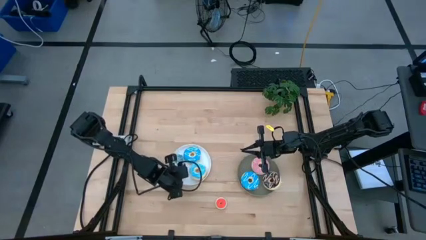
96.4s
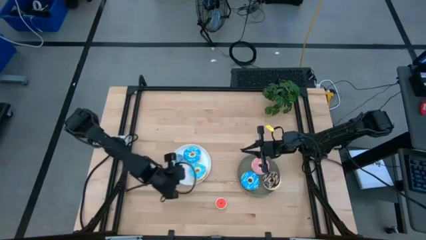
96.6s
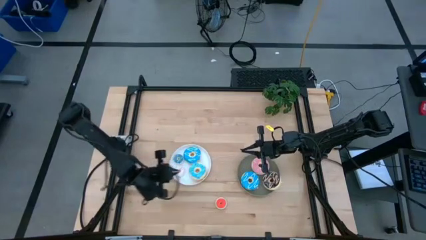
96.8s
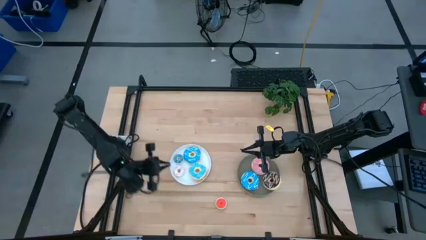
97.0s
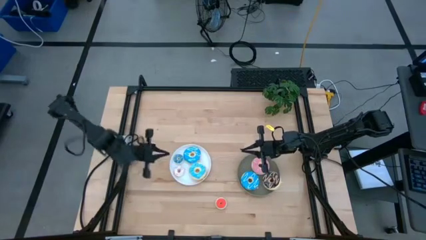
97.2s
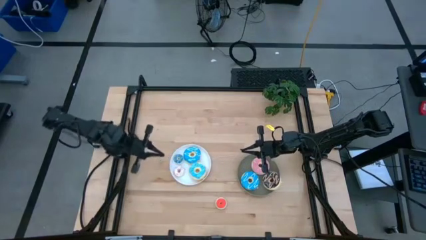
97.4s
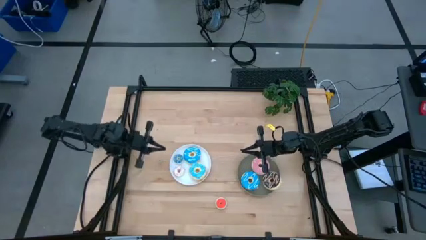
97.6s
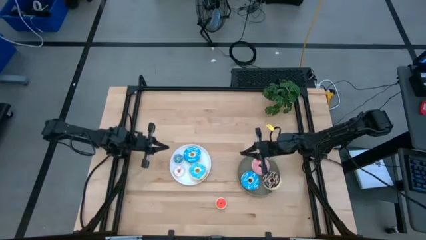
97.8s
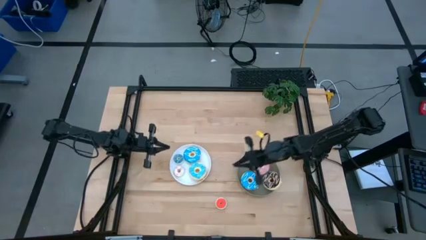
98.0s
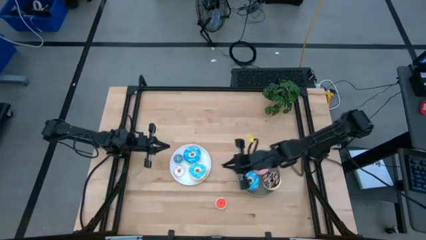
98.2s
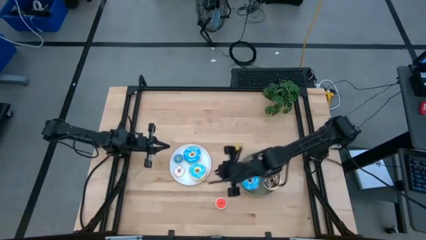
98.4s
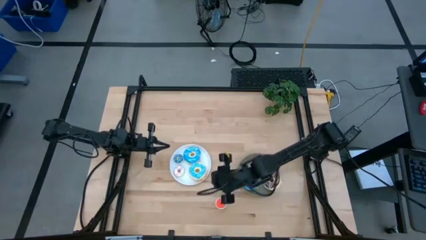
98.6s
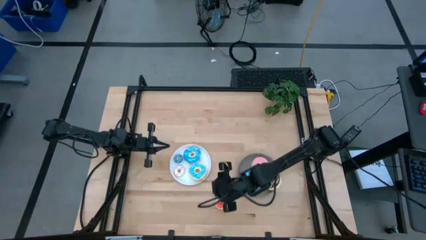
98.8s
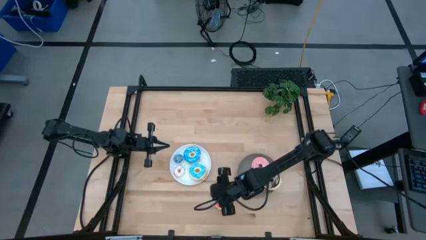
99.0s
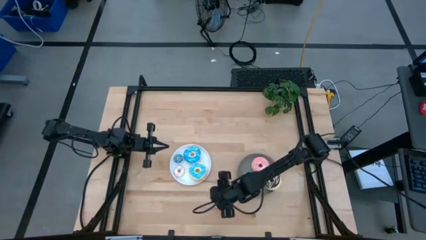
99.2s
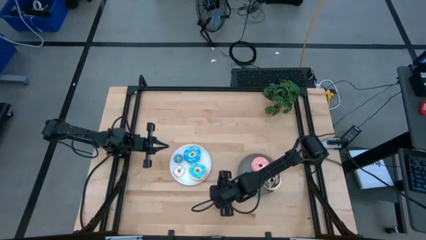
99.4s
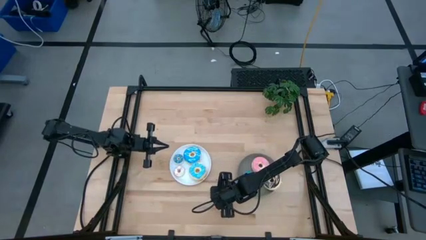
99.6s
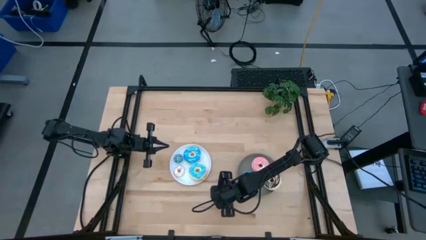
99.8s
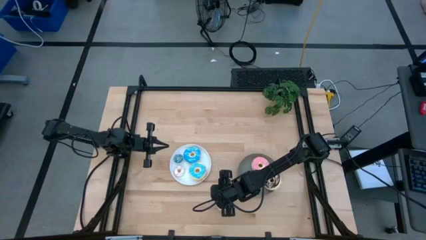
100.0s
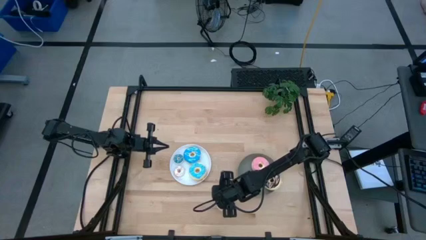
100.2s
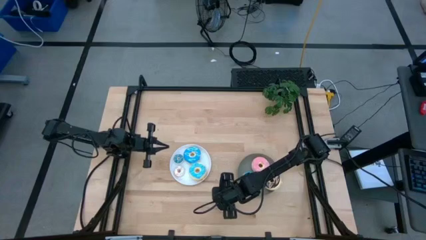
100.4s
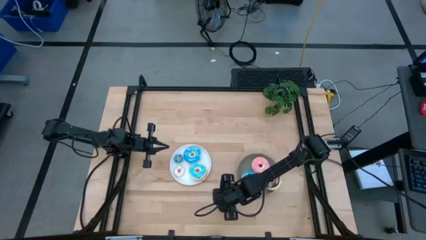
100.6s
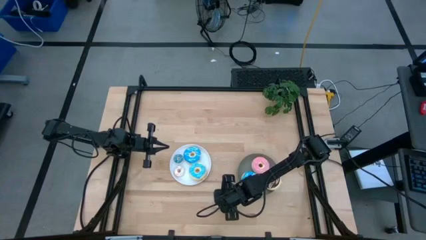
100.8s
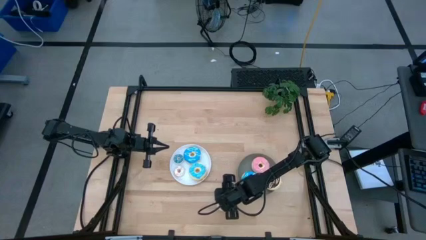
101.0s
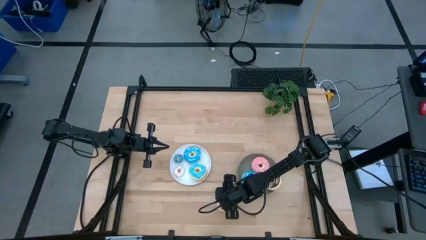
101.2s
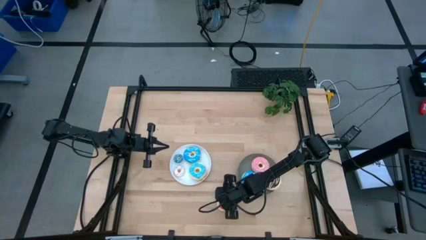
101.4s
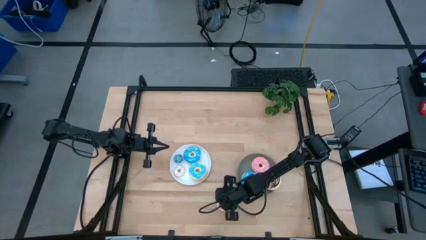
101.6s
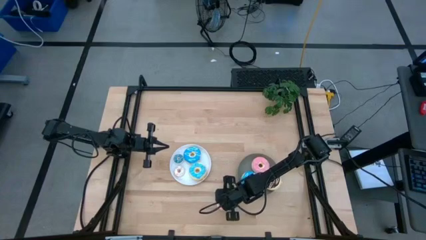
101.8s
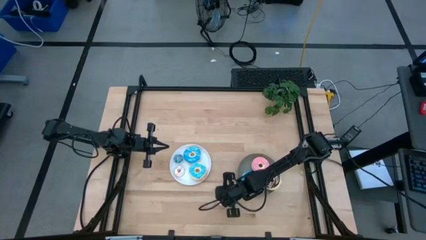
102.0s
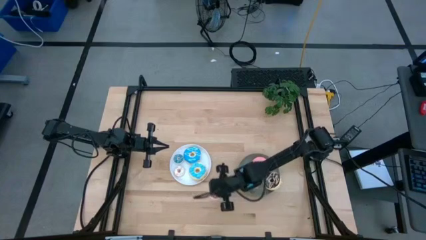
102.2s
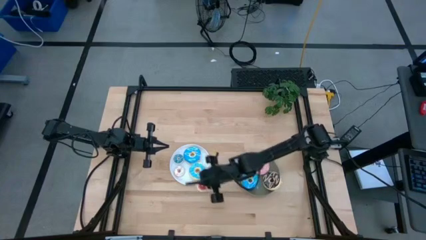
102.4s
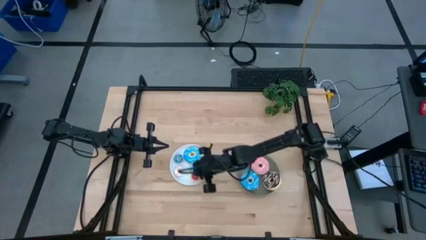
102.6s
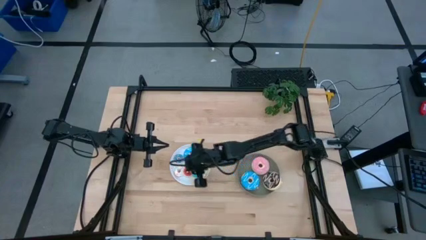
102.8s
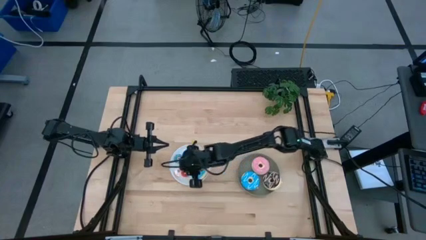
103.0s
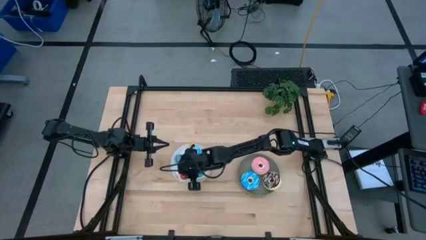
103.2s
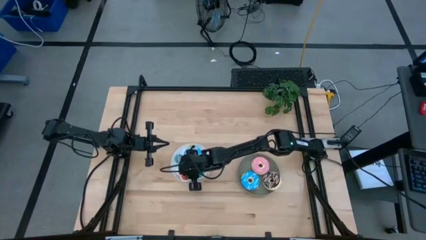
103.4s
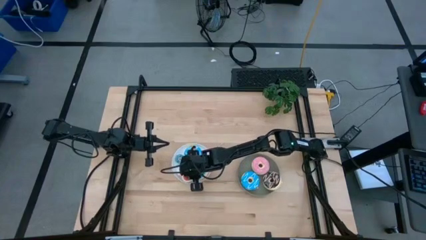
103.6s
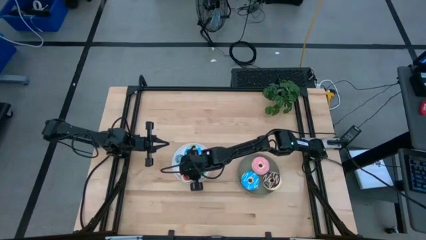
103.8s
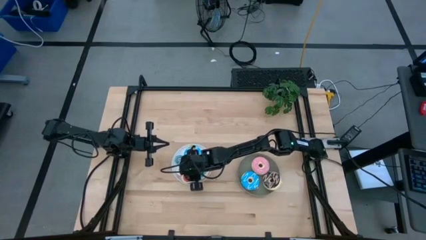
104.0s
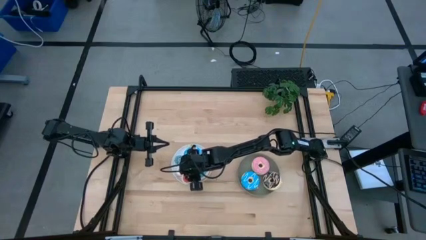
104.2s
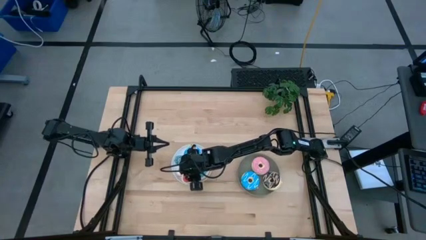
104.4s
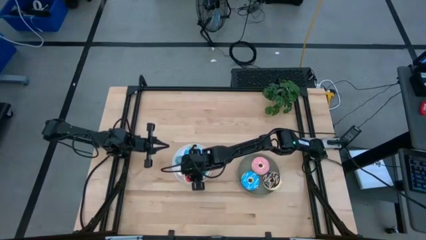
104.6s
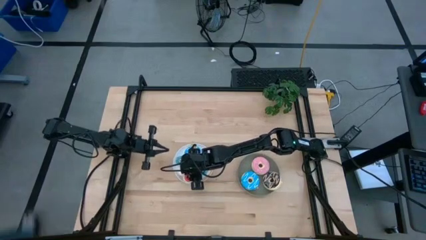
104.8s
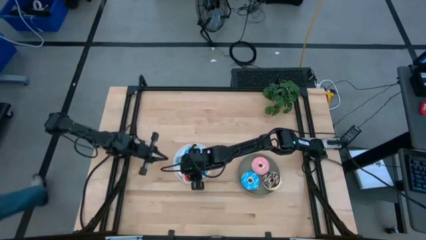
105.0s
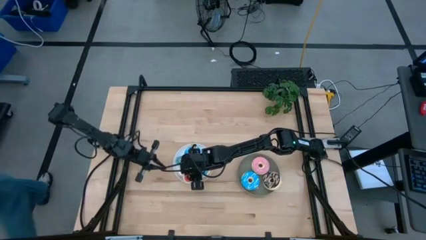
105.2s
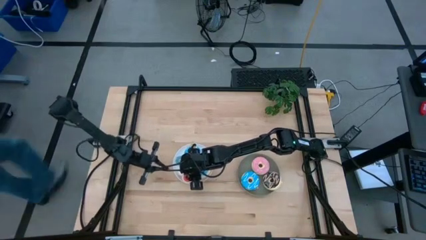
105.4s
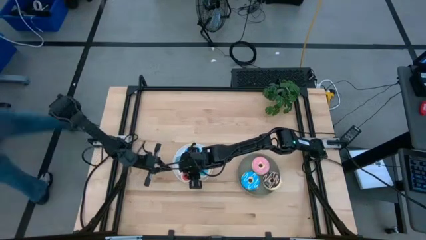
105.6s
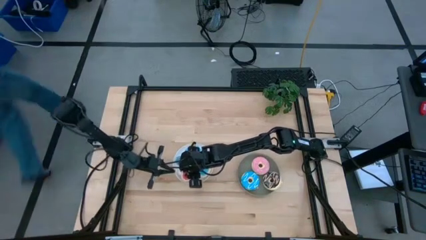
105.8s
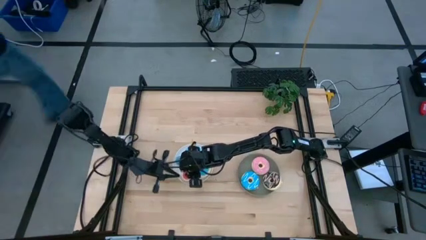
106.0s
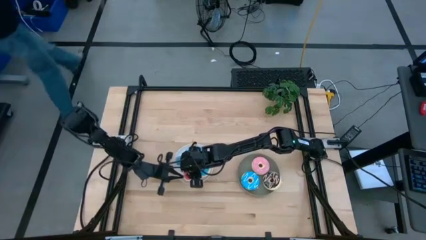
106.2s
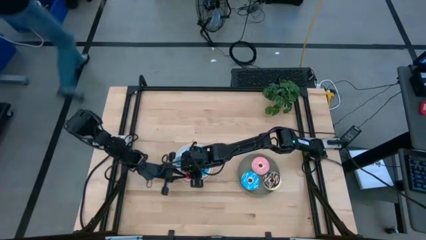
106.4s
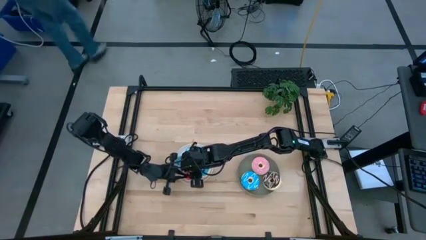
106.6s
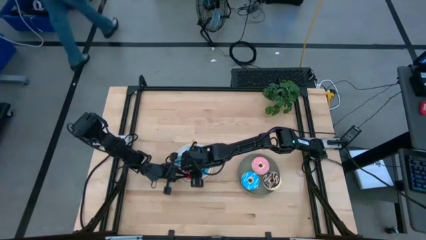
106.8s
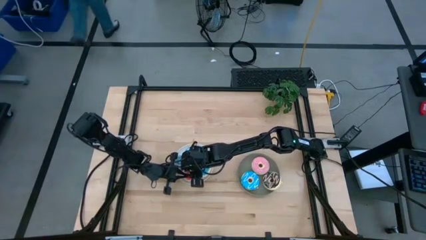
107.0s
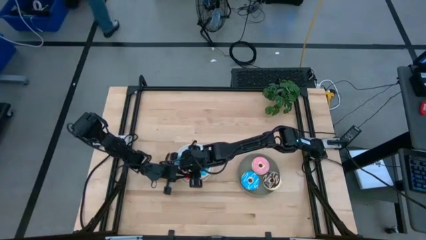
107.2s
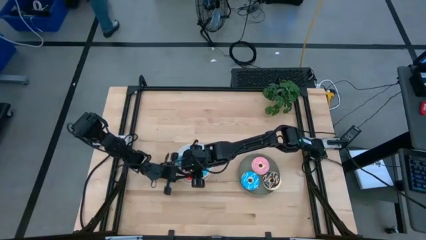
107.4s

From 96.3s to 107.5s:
Task: Pick & Place donuts
Put the small orange donut on the white plate

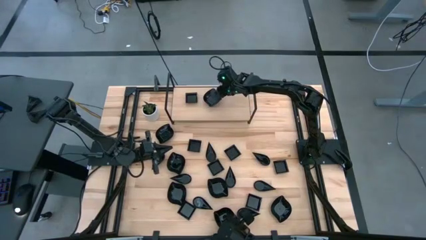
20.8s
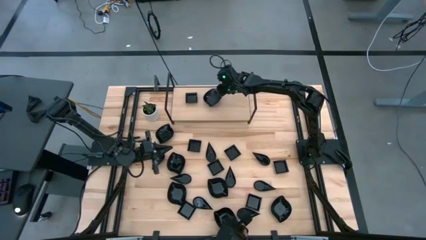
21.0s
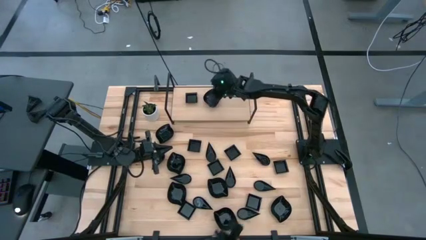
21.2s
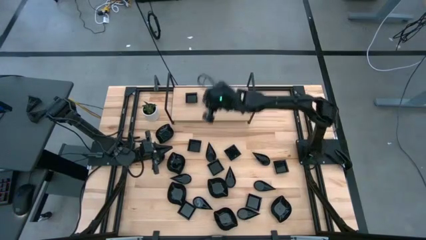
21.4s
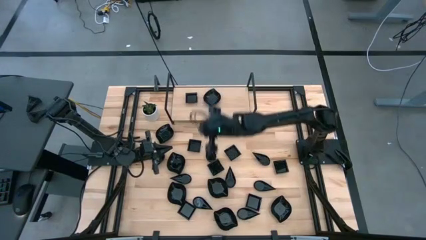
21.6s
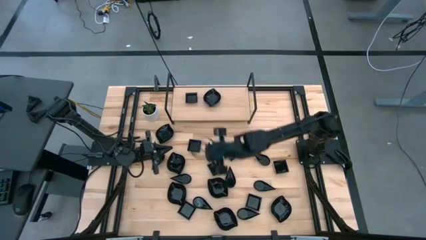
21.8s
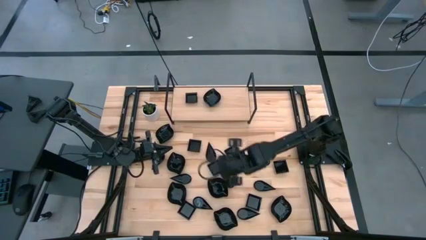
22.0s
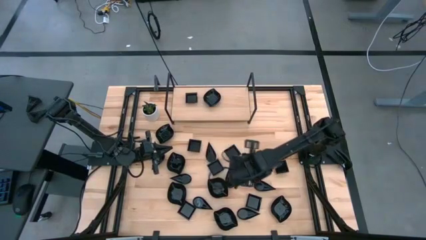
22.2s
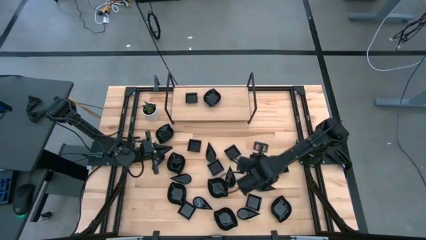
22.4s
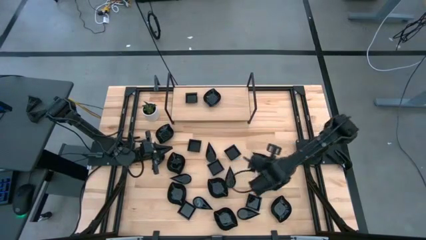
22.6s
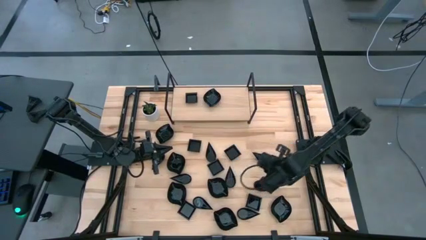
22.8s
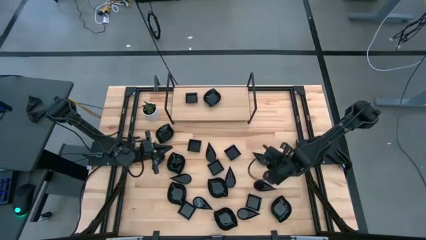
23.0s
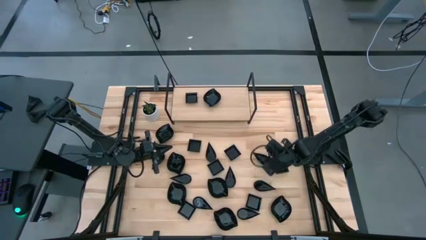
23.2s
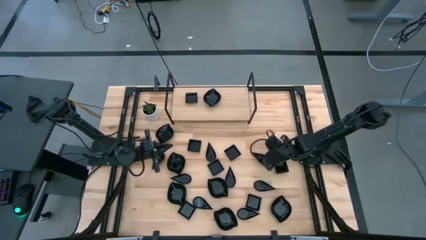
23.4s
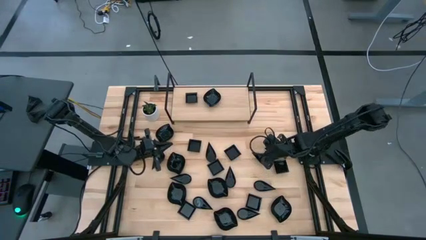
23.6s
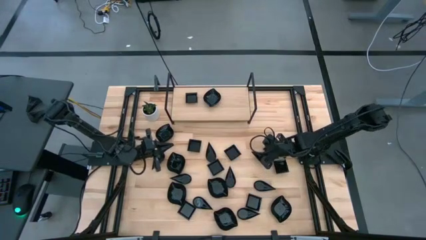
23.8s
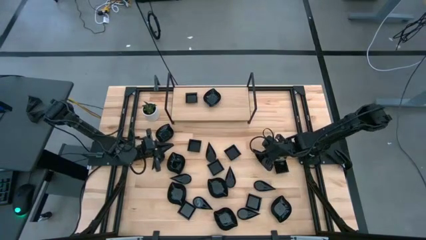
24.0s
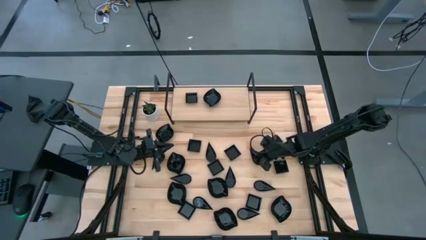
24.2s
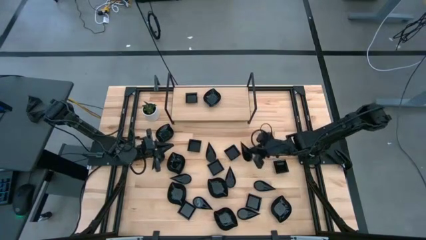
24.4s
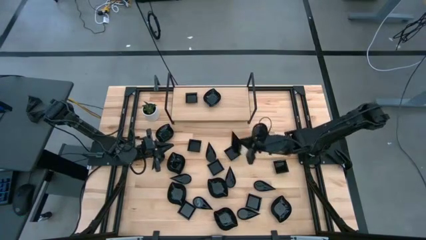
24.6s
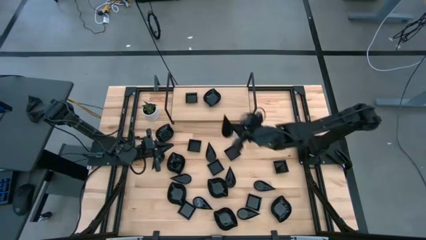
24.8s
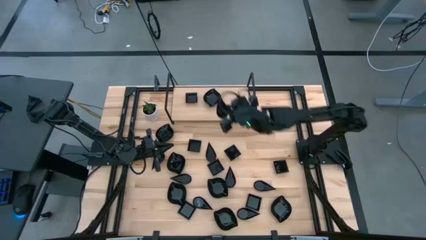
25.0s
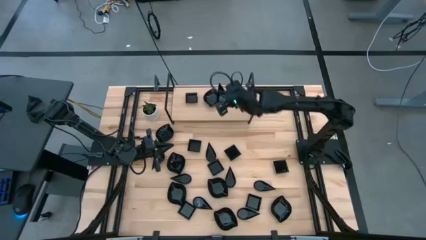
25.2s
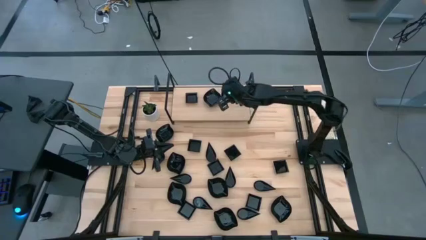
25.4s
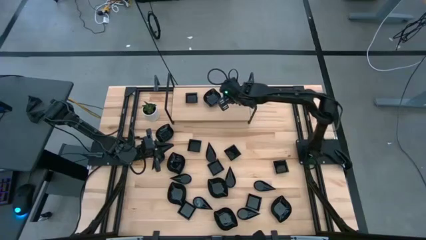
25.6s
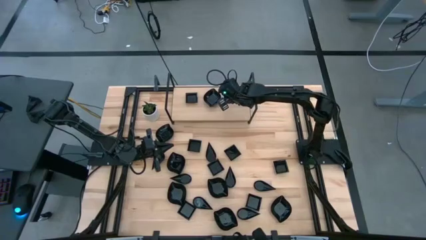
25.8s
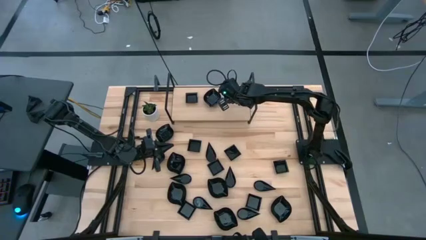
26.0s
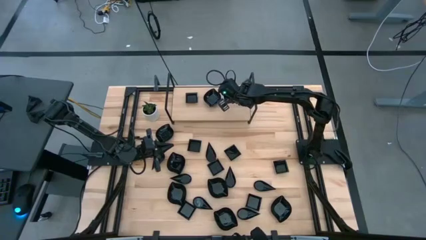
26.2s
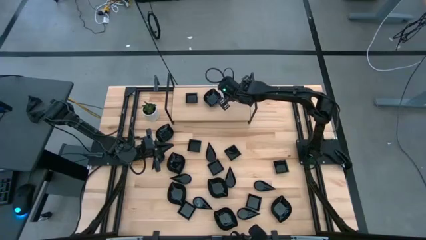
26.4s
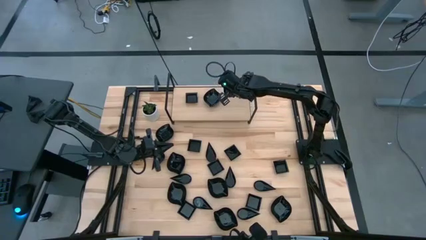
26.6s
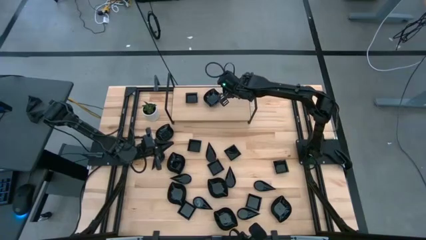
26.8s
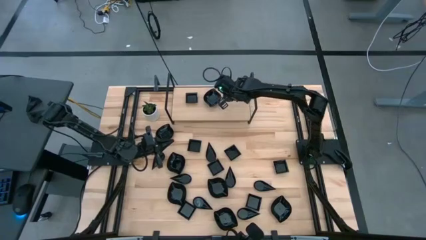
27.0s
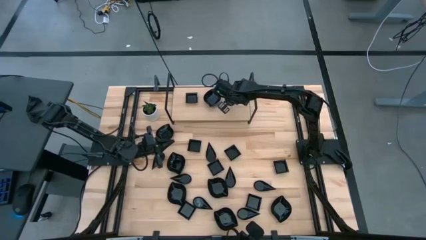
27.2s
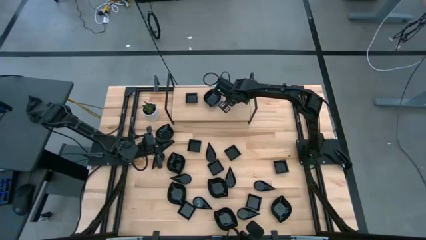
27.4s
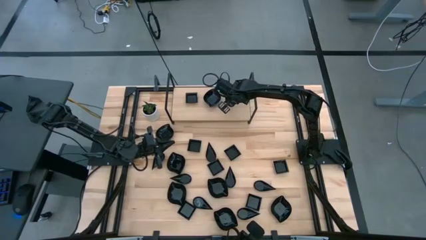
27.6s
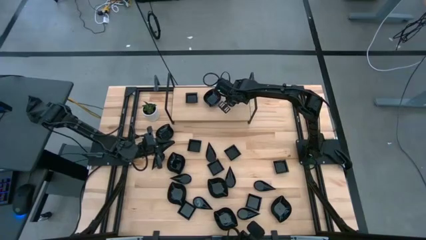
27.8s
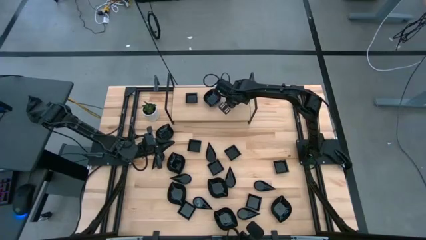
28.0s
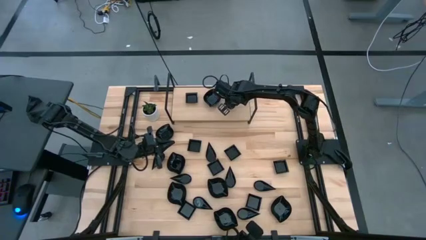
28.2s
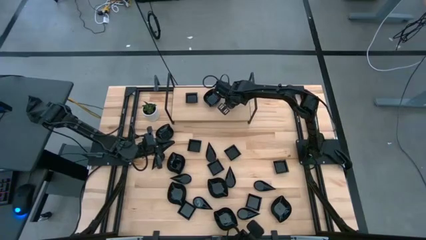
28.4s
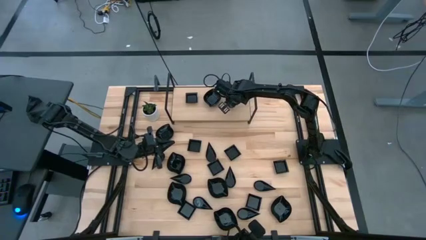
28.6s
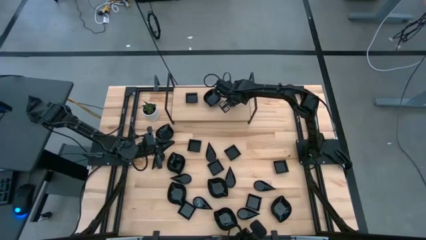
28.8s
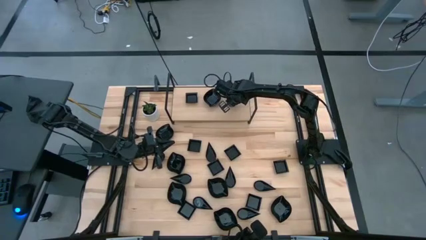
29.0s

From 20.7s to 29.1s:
Task: Pick & Place Mini shaped plates
Put the black teardrop shaped bowl on the shelf
